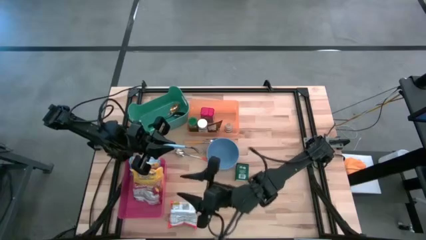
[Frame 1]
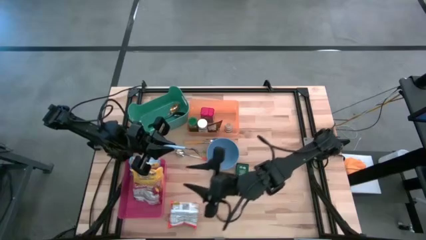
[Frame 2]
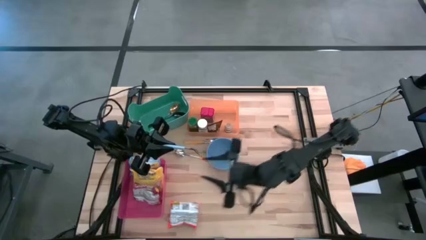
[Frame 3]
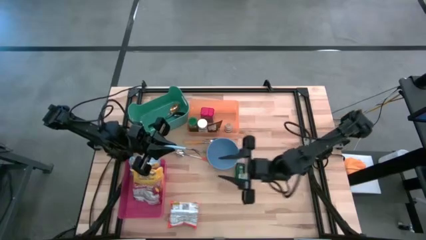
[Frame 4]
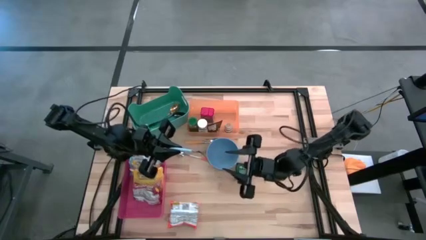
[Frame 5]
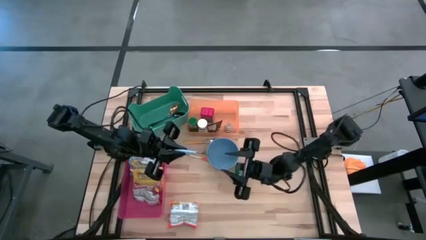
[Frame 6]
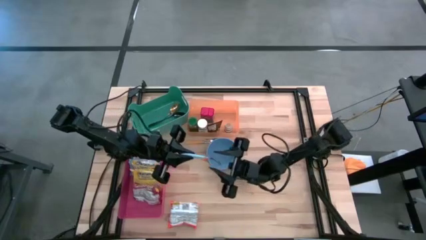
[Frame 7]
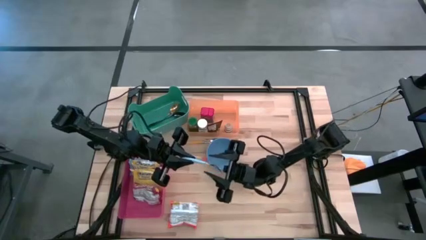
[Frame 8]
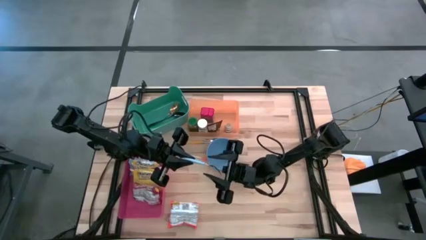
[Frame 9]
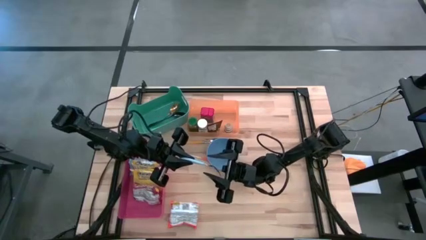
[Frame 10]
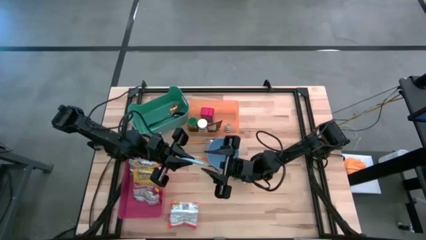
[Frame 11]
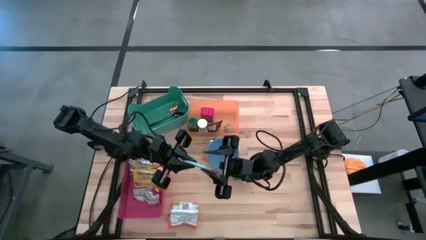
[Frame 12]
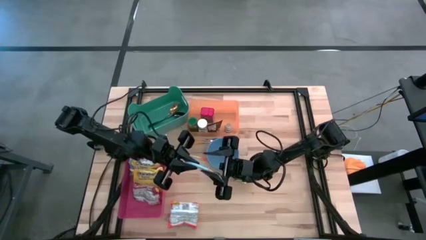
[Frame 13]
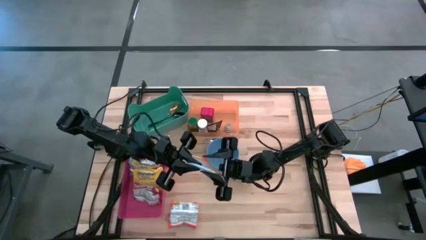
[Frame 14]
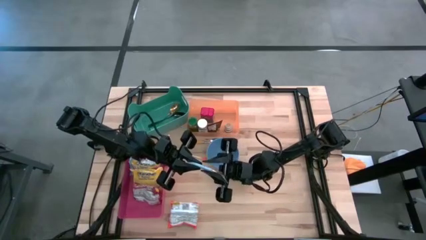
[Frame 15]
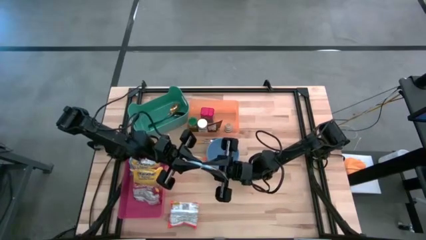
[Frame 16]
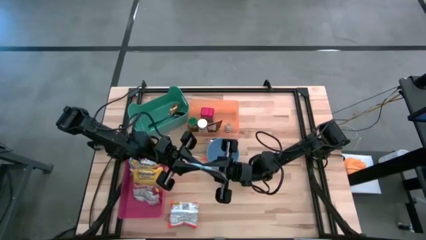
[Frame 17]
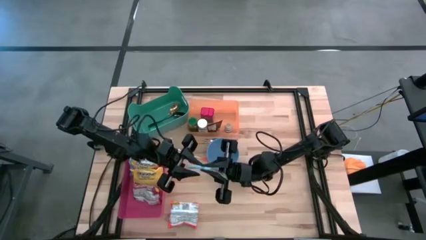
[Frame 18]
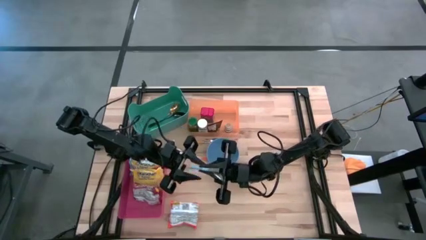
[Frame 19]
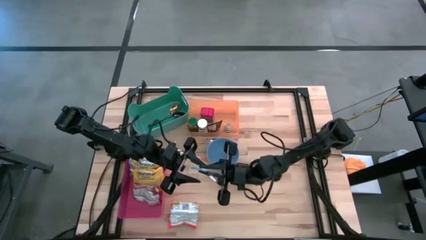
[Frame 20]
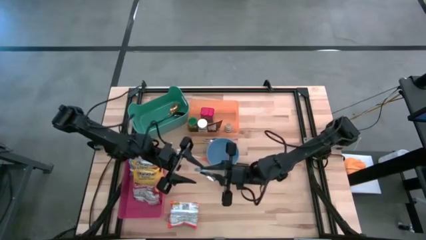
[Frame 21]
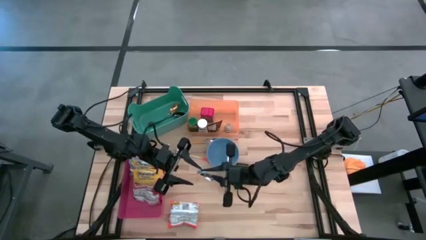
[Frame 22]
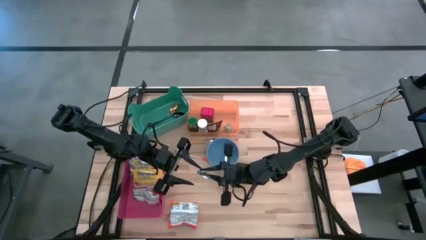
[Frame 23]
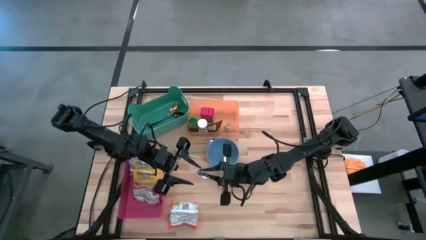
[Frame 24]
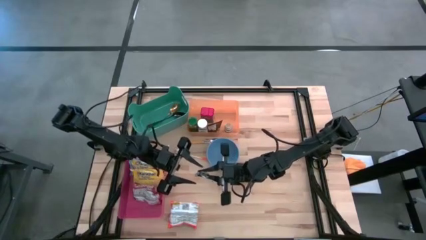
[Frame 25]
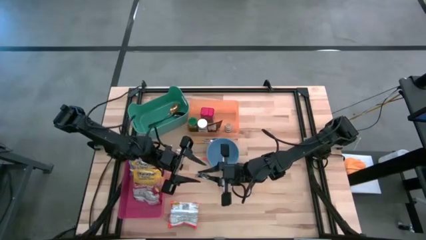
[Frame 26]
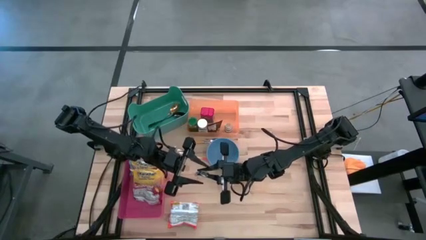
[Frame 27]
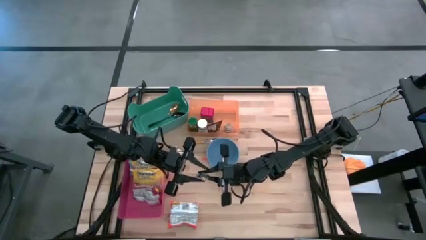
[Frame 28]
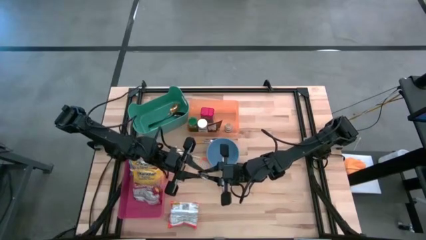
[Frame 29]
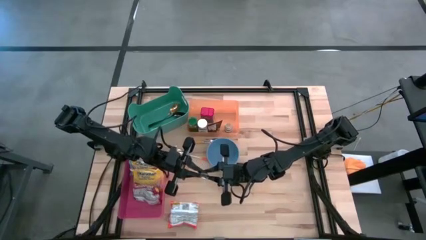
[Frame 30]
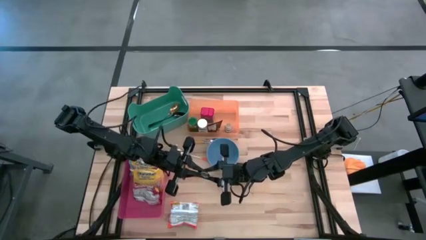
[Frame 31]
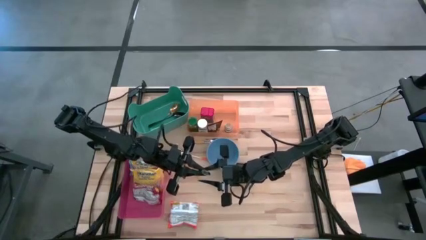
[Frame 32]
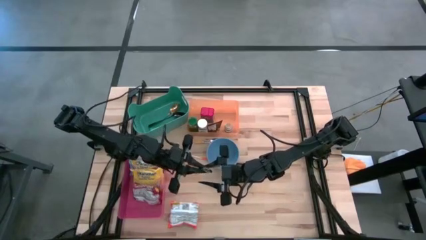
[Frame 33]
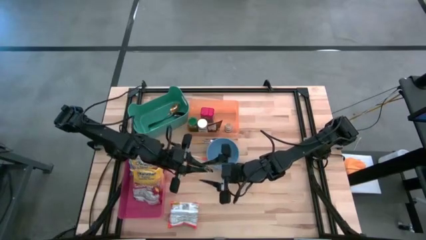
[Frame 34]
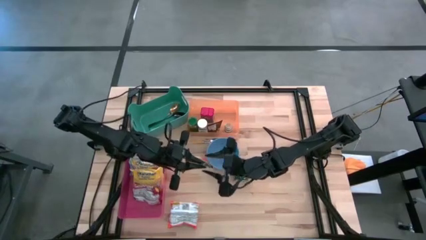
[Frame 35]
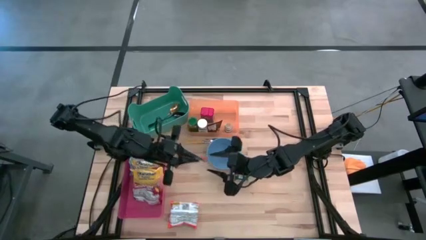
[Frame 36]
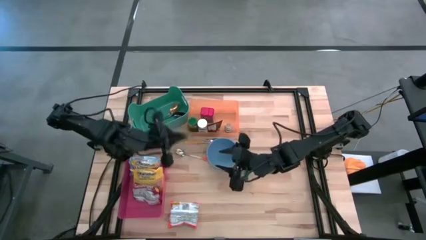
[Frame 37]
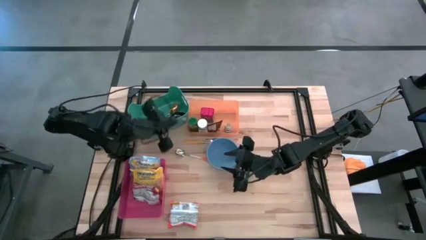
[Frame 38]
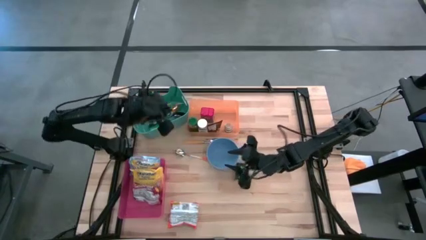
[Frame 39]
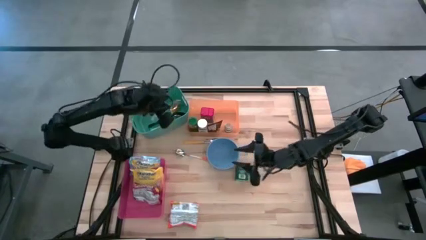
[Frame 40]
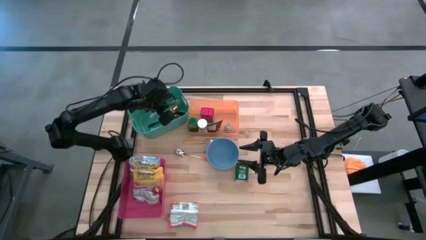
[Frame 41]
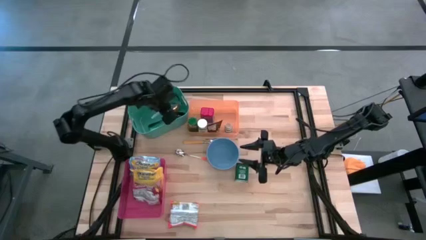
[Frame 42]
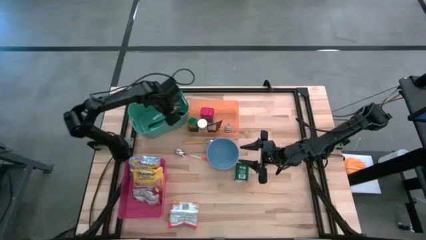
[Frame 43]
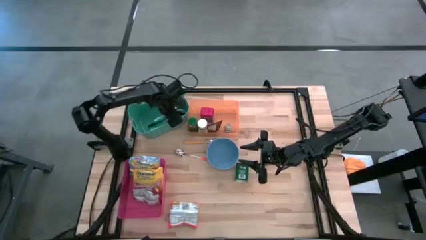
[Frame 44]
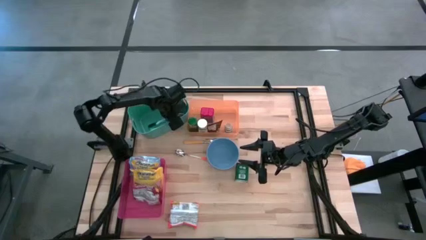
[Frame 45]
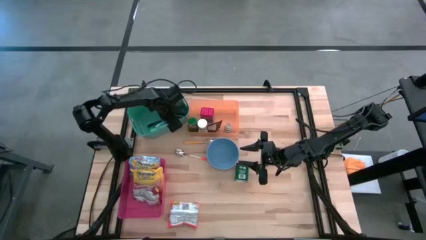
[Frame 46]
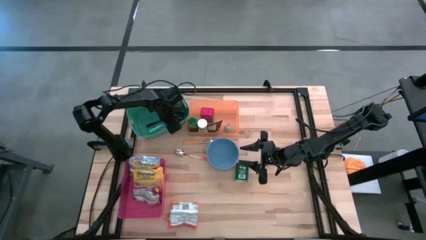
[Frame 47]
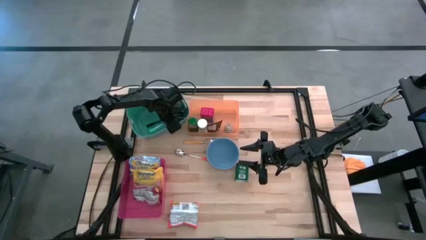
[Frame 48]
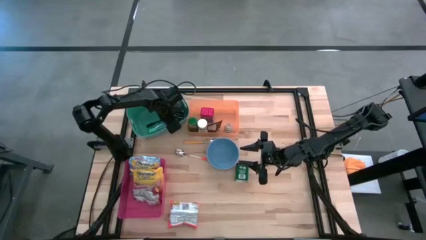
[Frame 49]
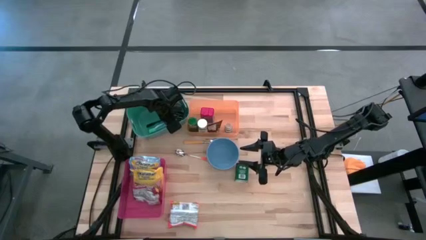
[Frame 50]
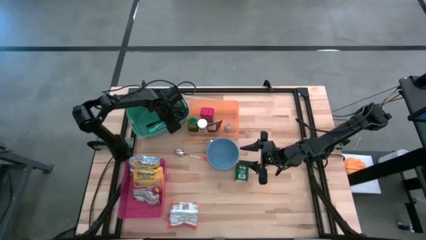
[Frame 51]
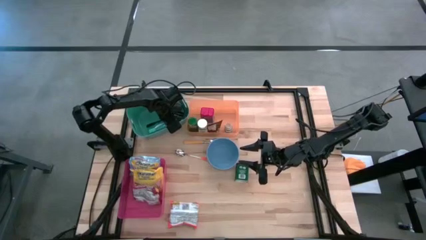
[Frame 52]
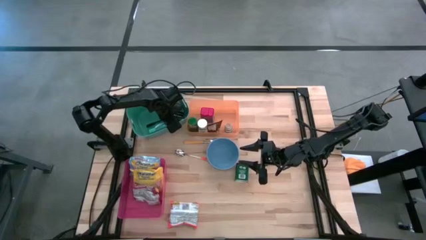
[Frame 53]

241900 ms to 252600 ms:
Put the blue spoon into the green bin
